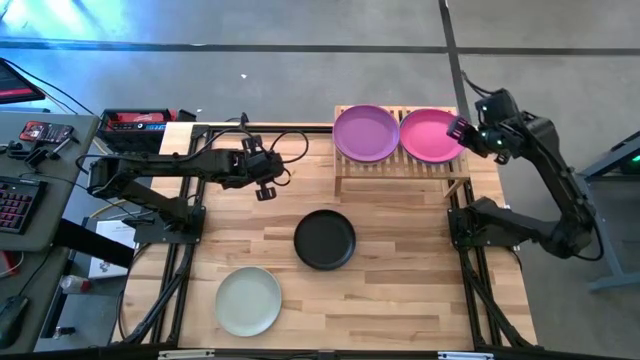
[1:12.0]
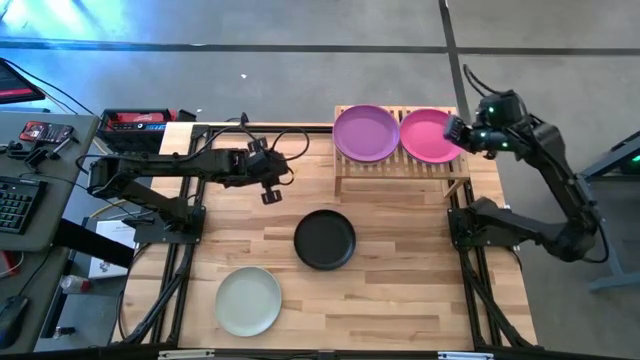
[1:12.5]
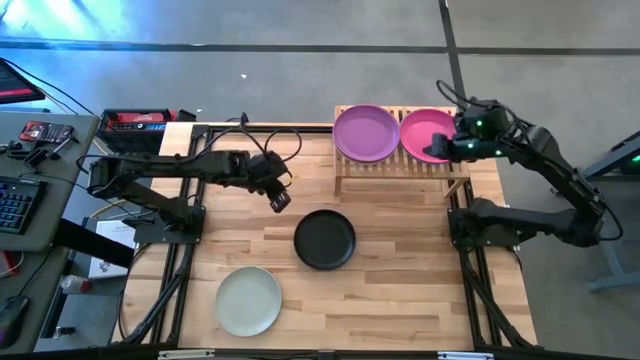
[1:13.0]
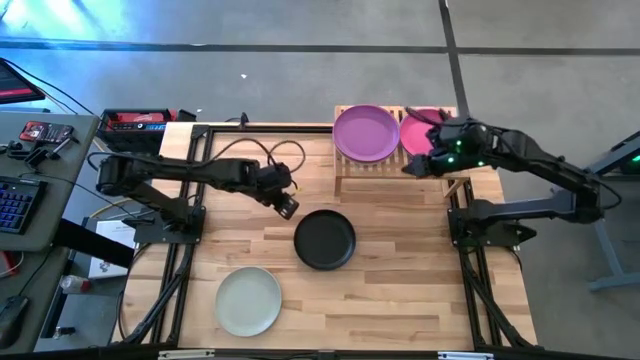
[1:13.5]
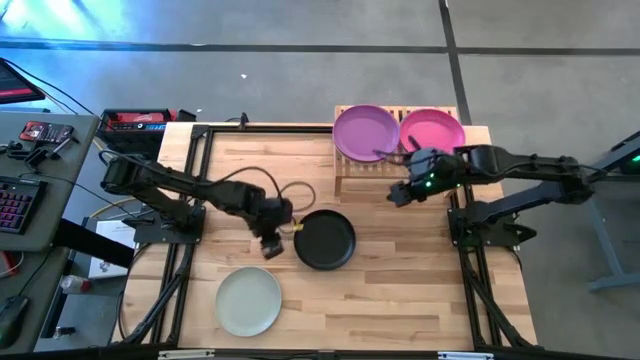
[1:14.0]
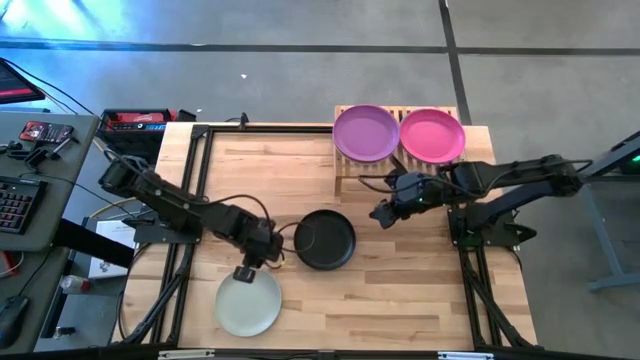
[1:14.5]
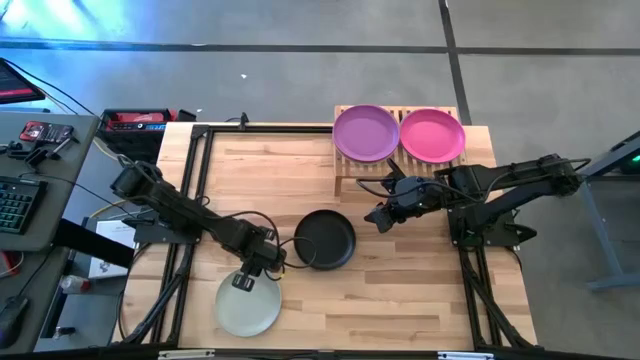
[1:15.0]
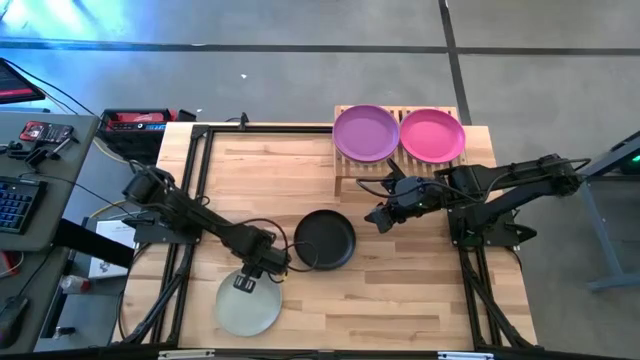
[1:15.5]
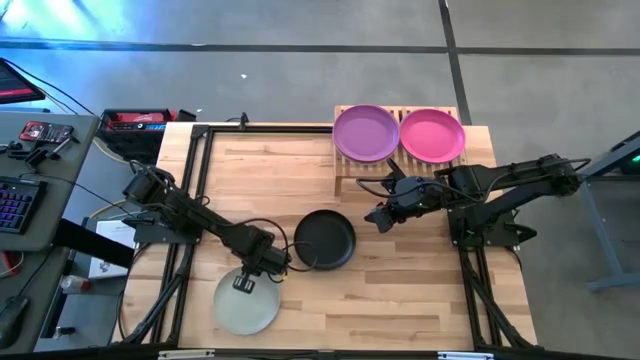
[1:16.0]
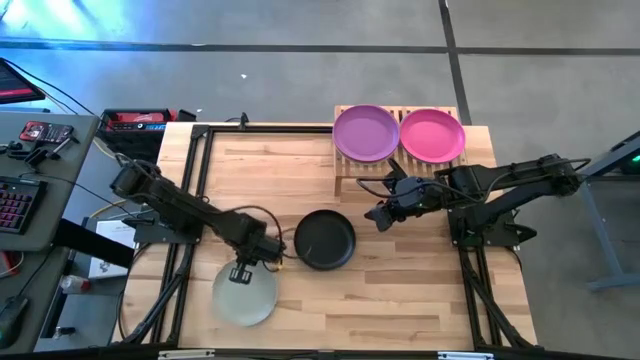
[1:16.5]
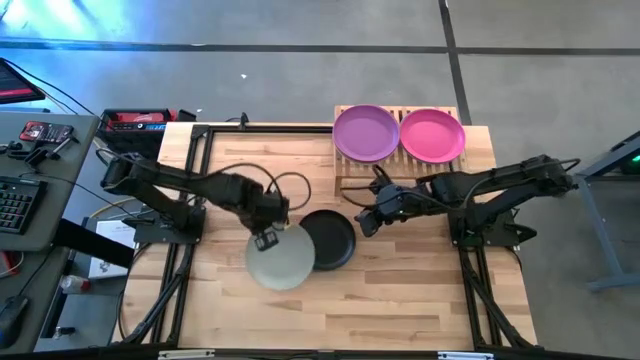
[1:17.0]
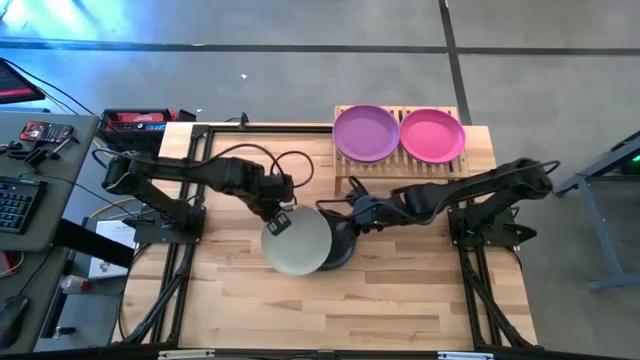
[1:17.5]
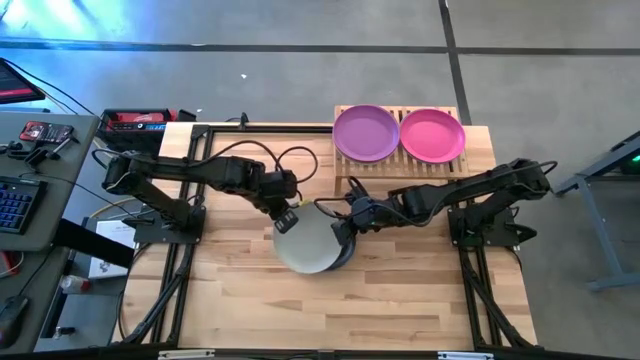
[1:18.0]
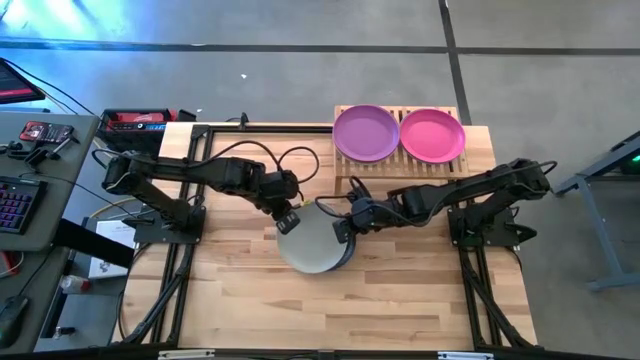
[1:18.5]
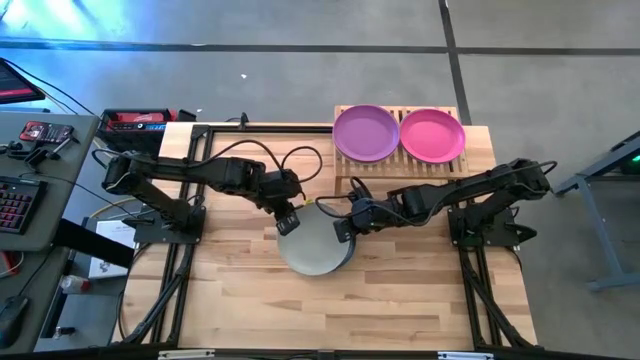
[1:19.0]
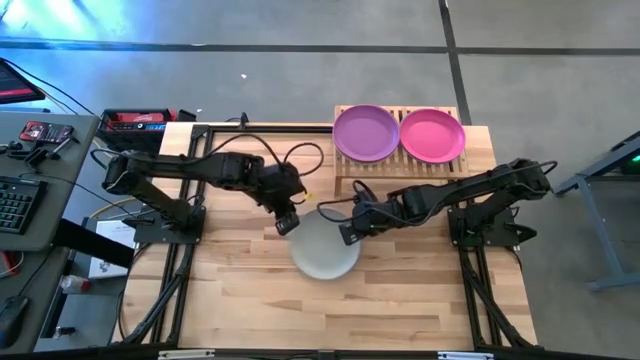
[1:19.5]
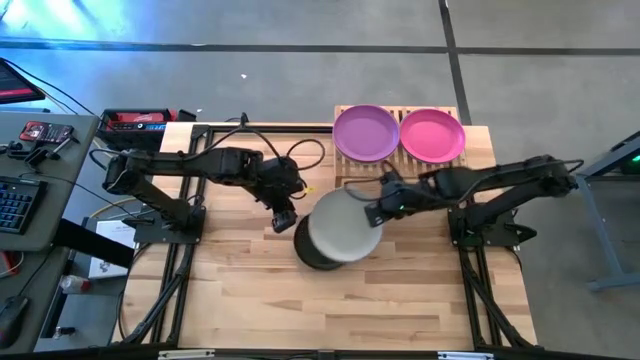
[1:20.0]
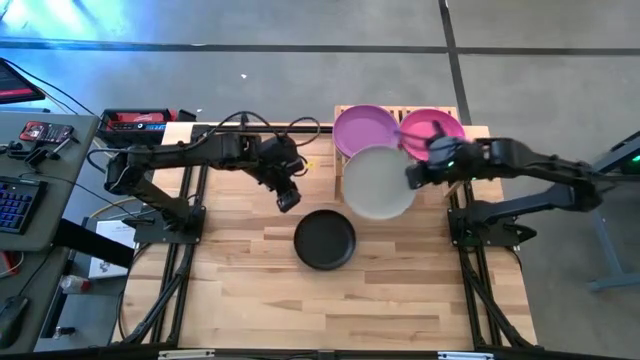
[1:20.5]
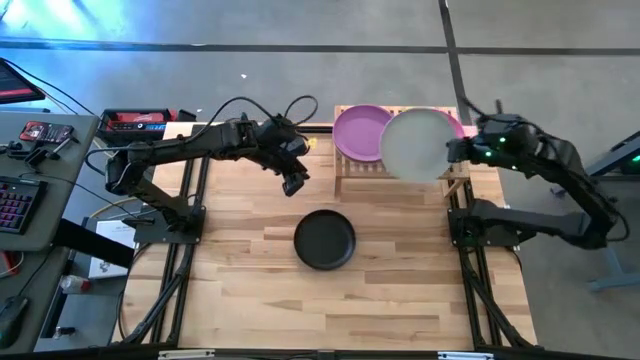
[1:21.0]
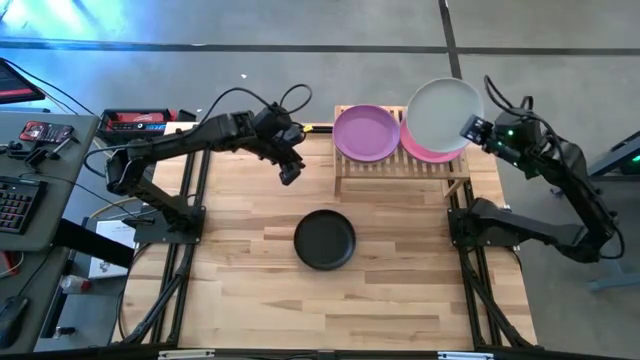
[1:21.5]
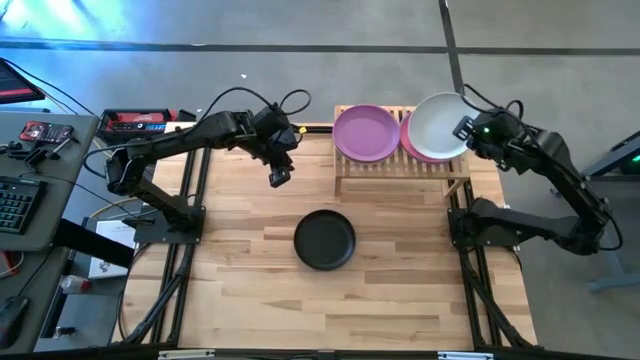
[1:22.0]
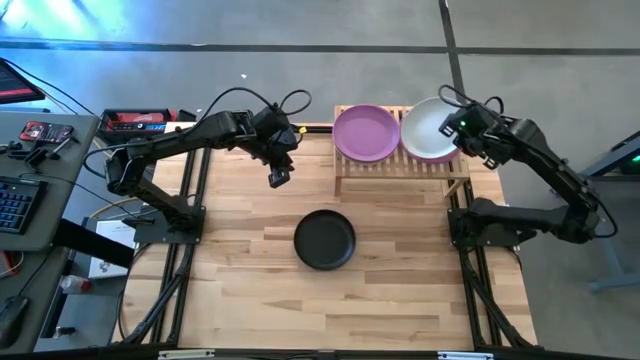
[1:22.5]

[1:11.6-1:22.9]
Task: Place and stack plates onto a shelf
Stack the bottom left white plate on the pink plate

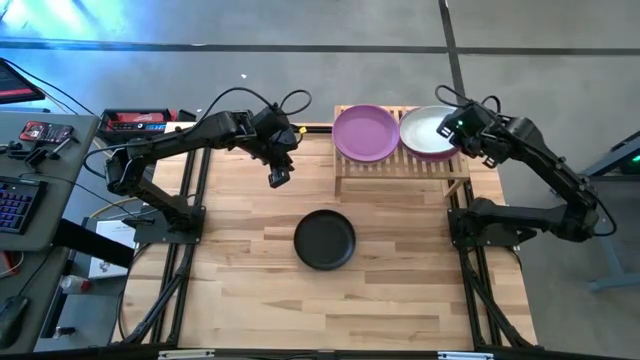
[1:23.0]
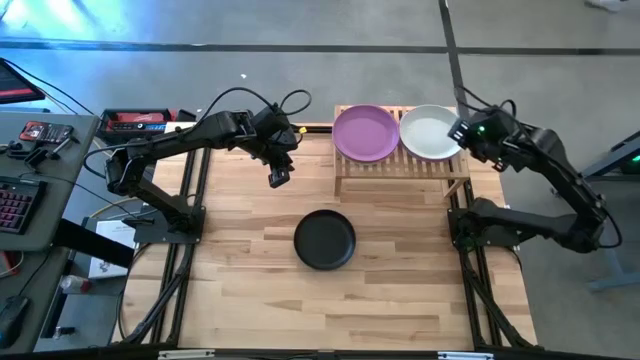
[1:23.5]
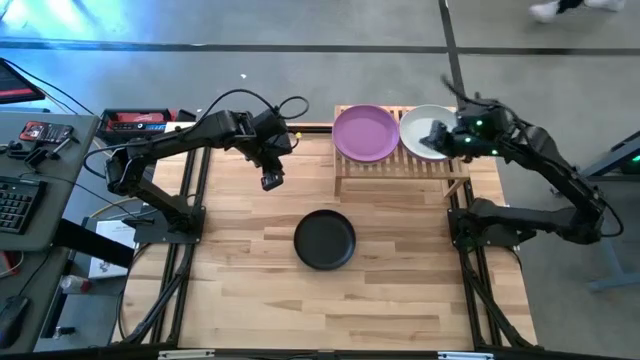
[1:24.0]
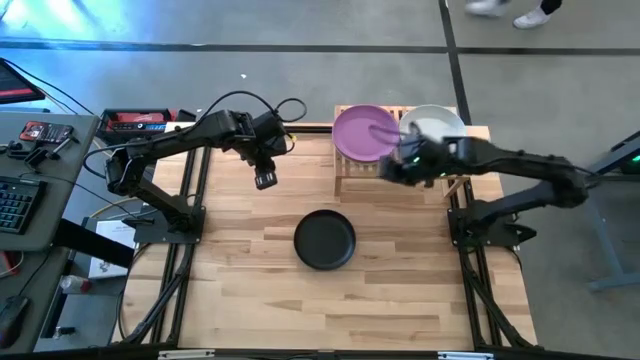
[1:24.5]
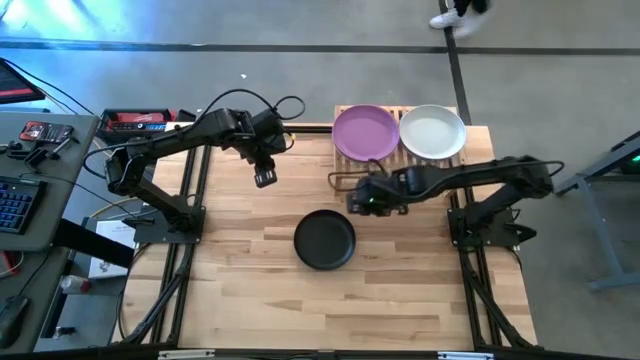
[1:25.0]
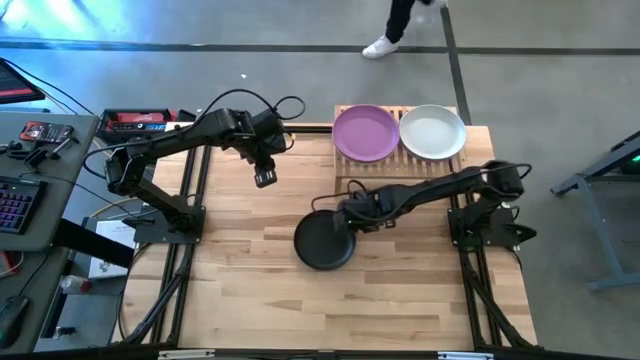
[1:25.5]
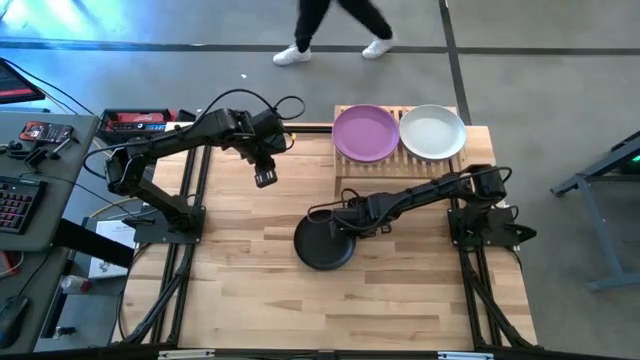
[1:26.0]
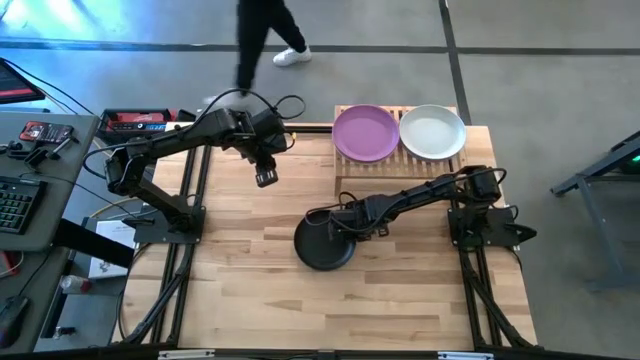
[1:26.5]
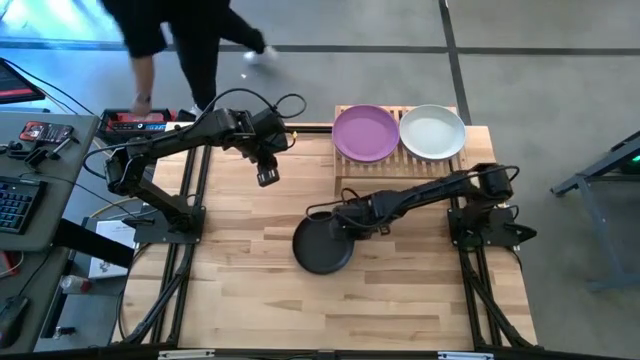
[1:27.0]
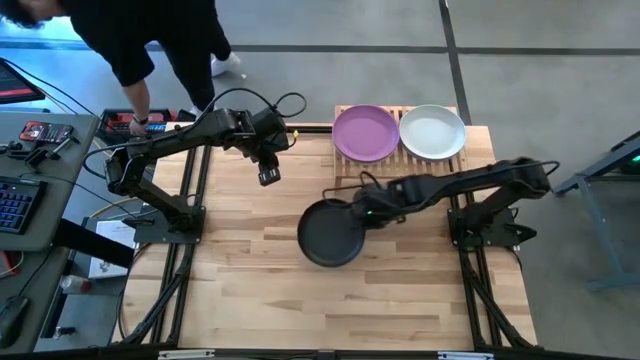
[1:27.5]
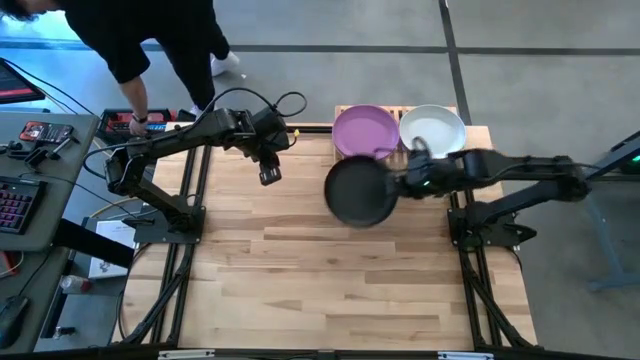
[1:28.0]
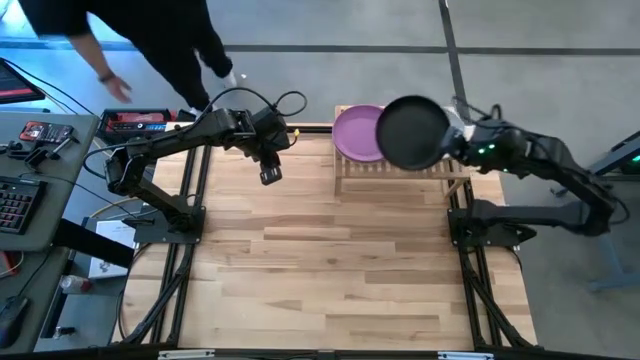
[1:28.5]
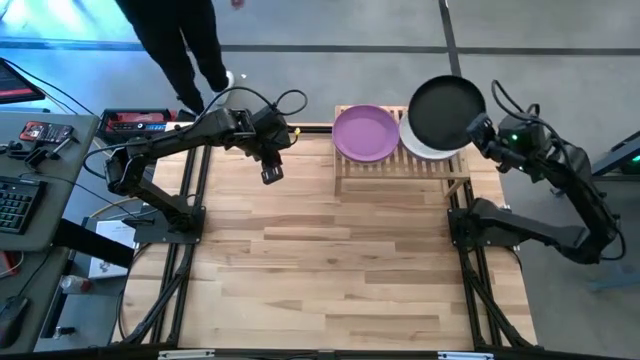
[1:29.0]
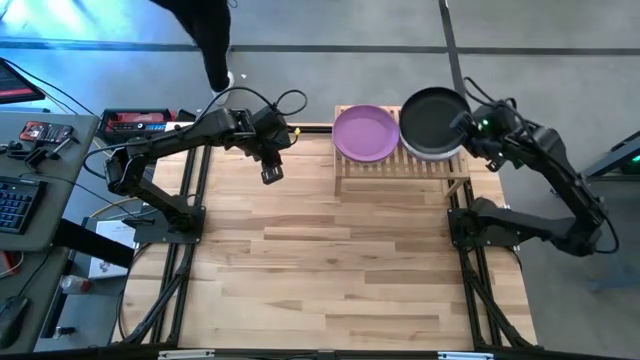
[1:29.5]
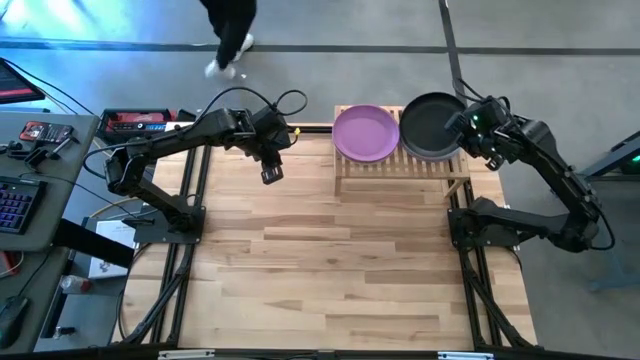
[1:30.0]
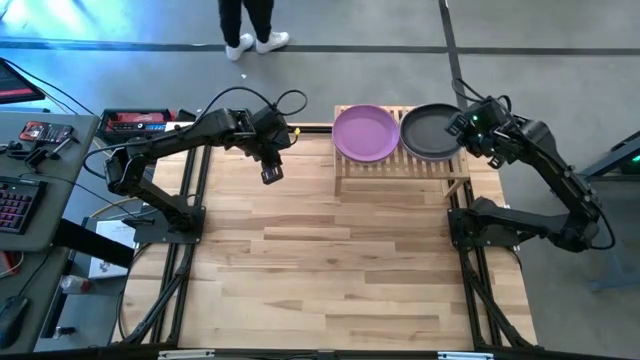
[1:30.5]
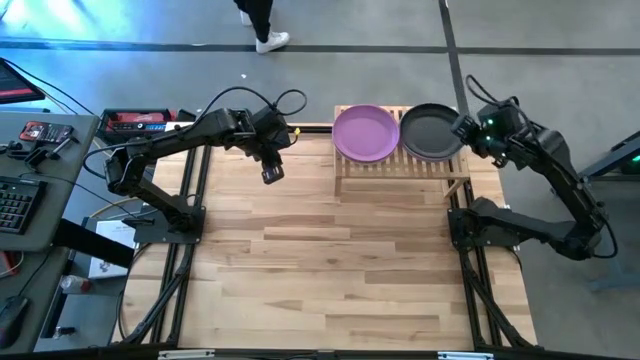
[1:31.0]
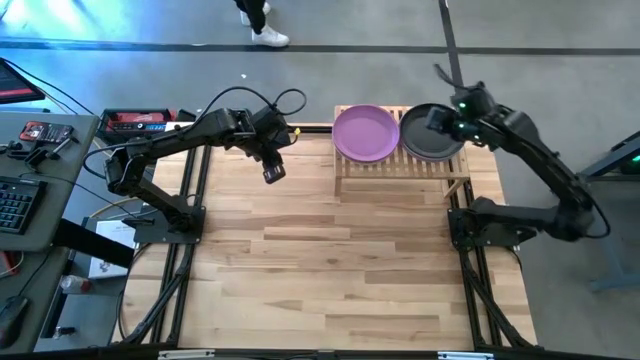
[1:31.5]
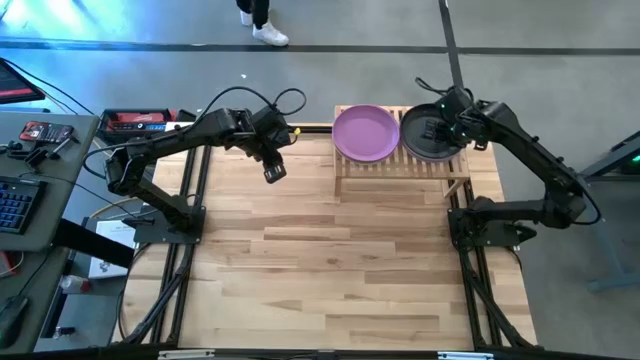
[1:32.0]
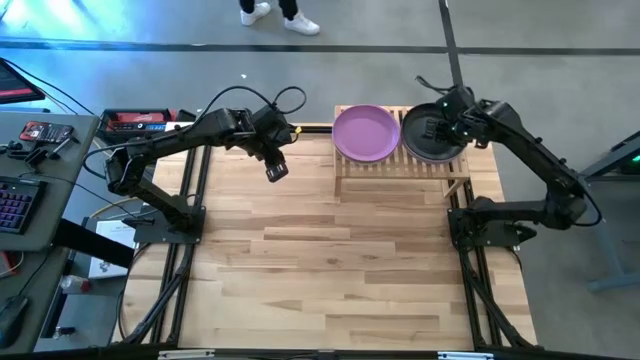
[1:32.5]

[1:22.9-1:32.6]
Stack the center black plate on the white plate
